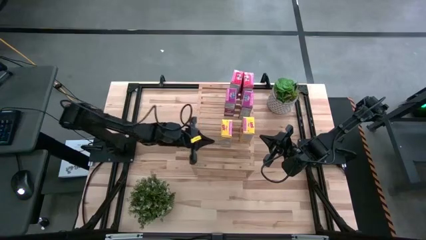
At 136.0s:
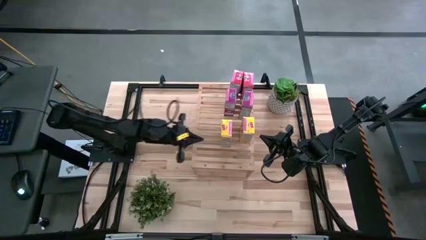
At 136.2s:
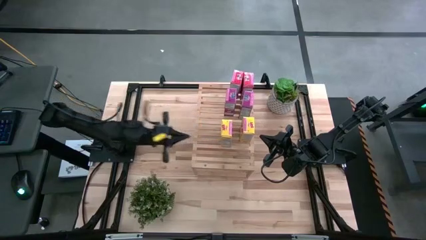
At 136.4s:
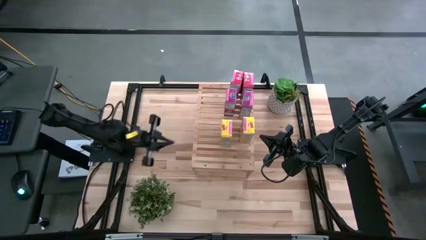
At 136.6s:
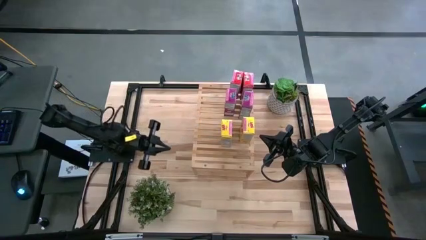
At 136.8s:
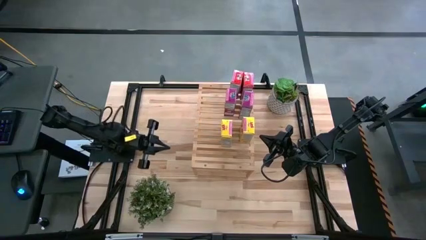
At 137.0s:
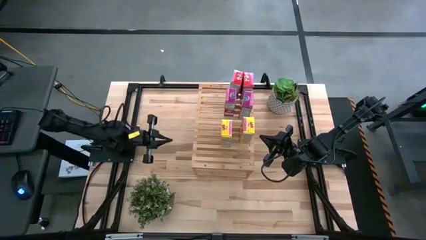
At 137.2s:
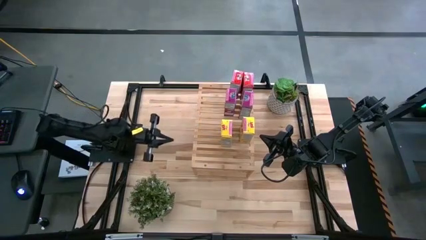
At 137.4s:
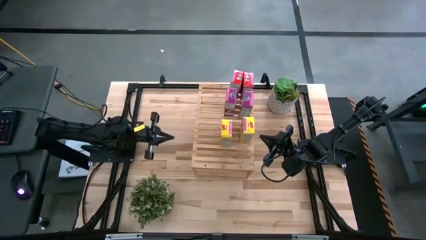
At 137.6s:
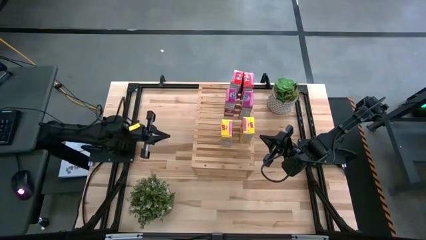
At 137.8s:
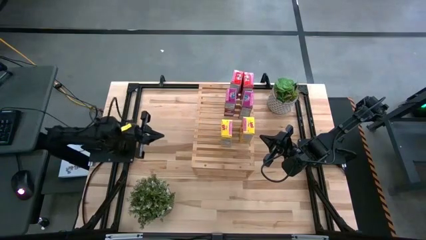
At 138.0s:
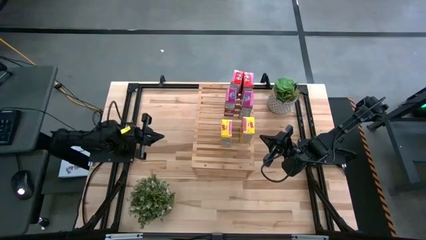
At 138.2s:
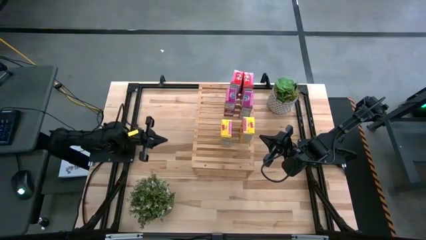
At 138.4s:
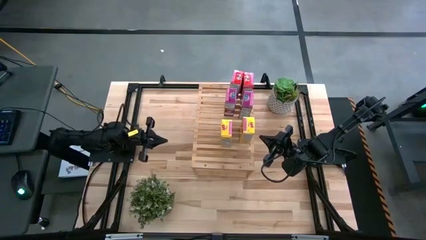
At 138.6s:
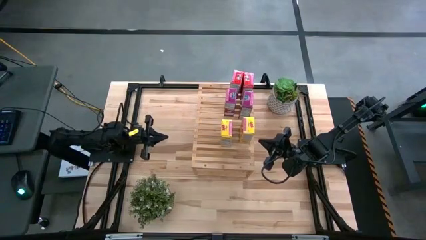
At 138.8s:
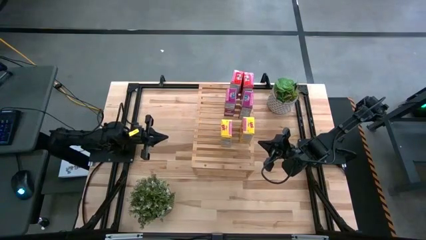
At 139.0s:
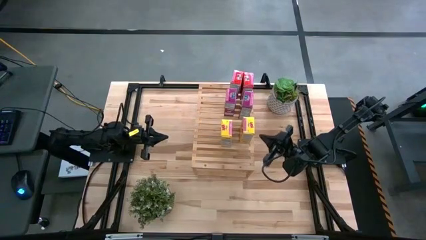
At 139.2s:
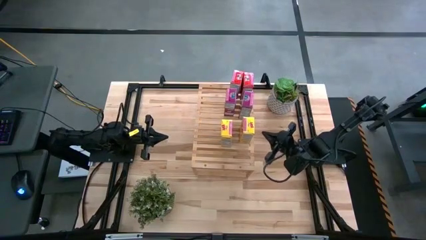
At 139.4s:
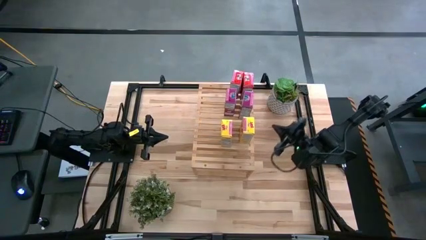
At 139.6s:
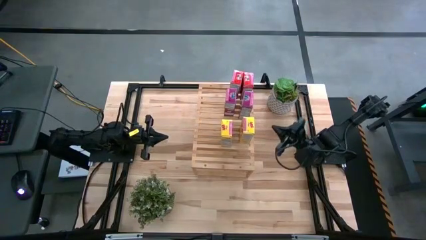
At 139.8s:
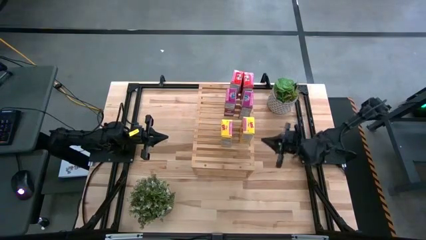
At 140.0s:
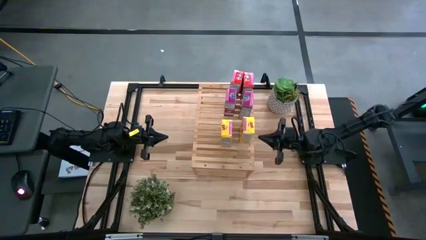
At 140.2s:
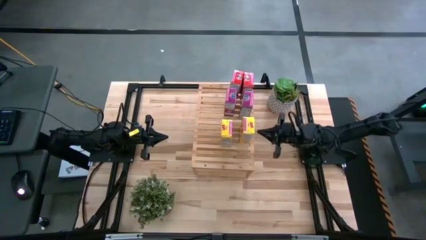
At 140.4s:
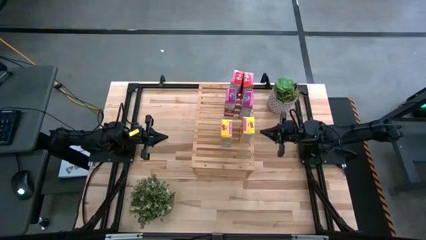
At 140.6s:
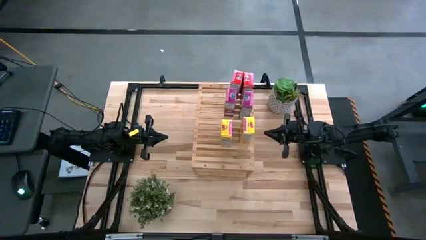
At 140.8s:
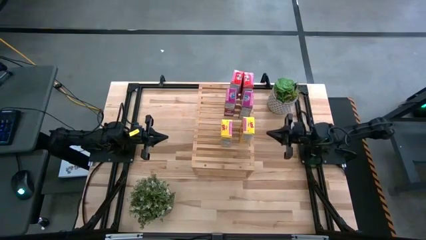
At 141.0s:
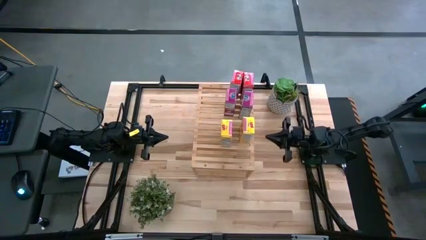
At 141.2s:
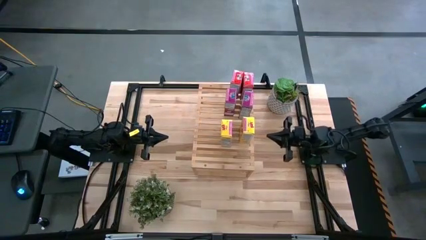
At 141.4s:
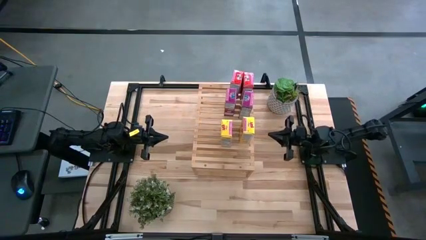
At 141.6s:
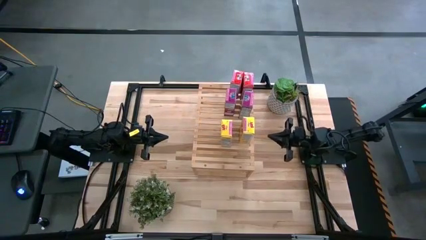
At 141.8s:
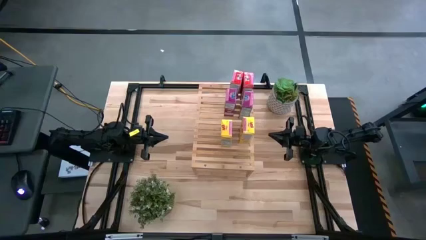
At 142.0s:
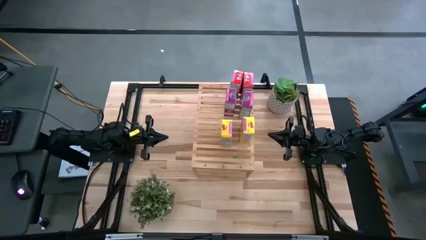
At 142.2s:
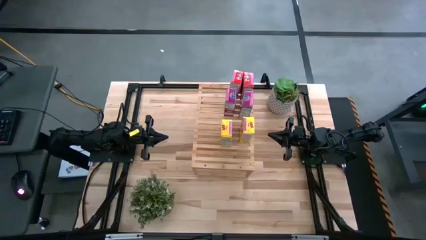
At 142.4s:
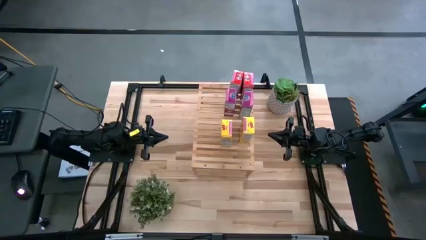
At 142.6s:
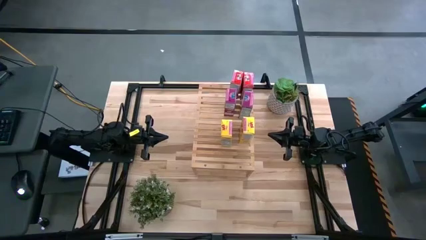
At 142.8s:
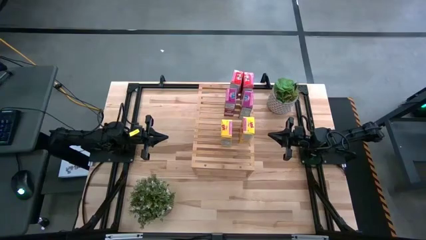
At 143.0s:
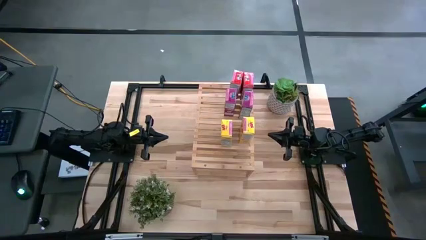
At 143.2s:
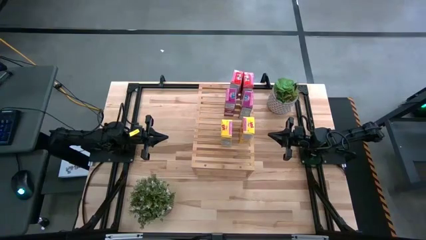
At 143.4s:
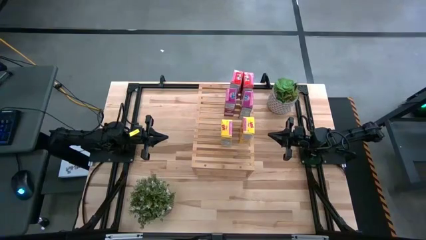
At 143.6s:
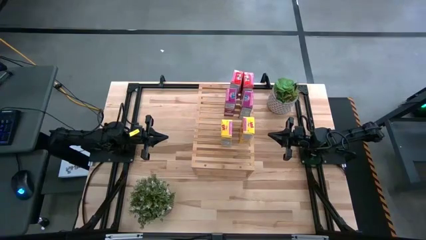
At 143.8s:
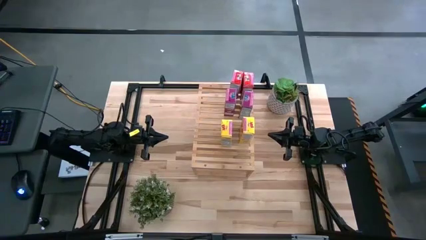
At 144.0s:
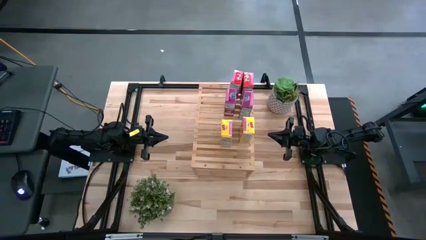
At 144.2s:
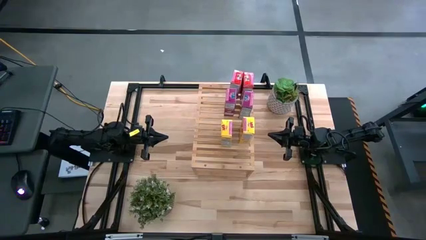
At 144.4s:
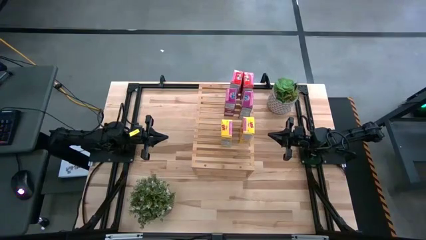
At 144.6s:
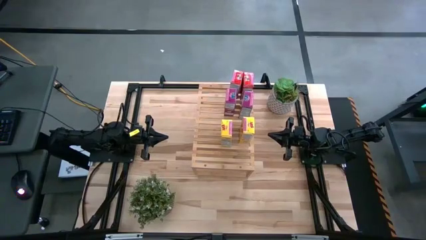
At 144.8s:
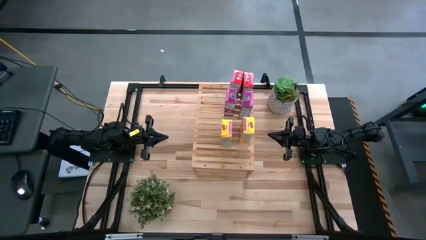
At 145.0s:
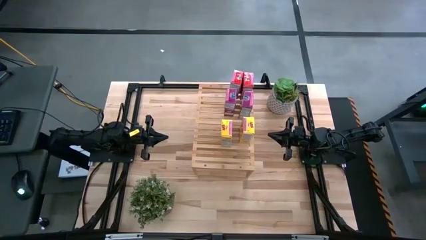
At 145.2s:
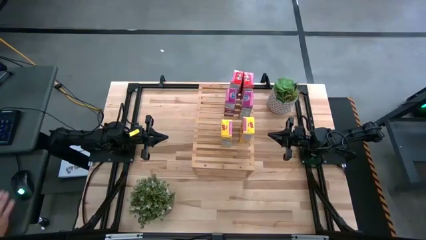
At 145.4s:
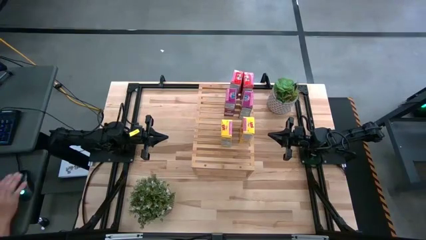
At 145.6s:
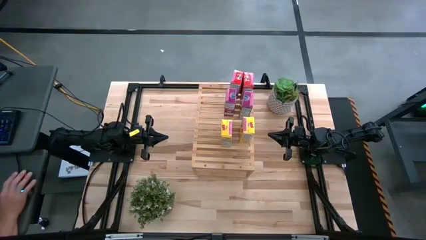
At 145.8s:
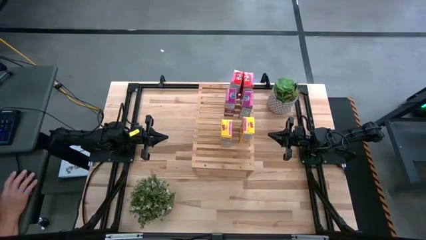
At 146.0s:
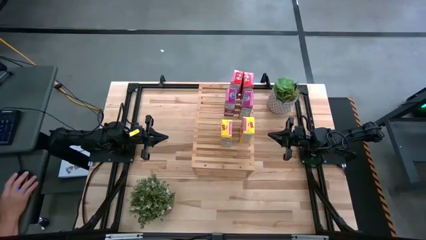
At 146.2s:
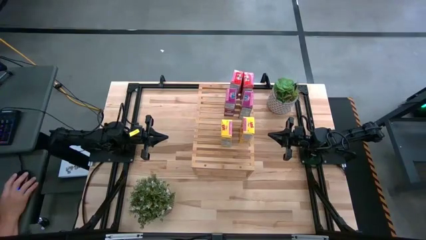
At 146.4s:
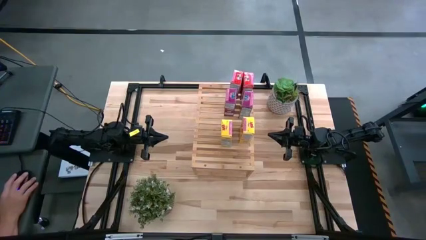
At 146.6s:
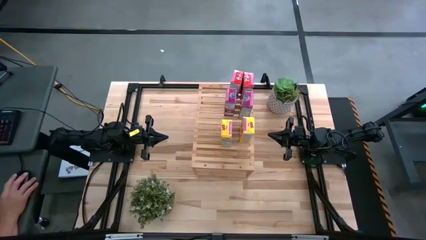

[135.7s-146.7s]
Task: Stack cereal on shelf
Return to Home Position

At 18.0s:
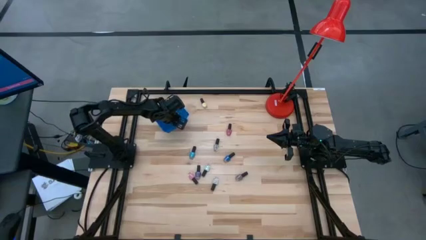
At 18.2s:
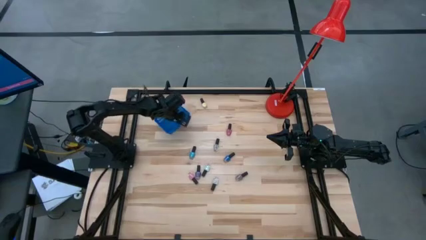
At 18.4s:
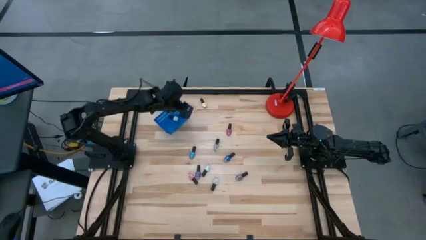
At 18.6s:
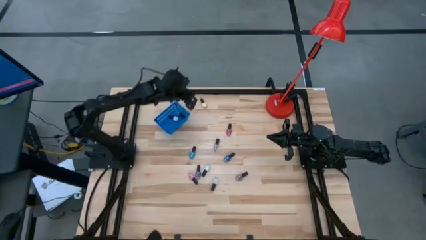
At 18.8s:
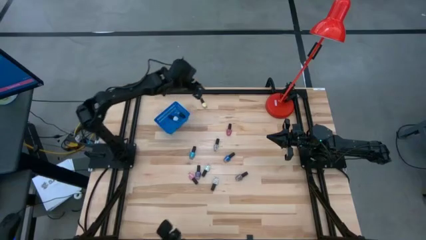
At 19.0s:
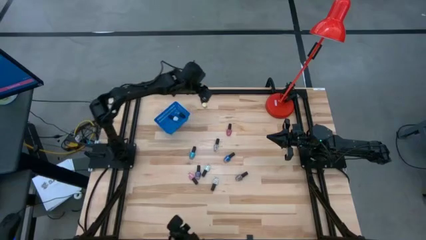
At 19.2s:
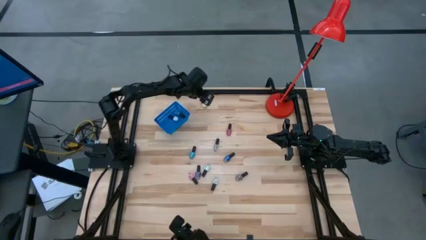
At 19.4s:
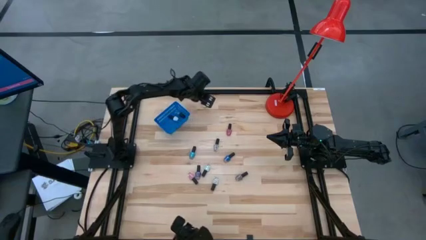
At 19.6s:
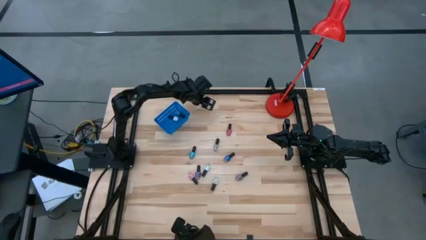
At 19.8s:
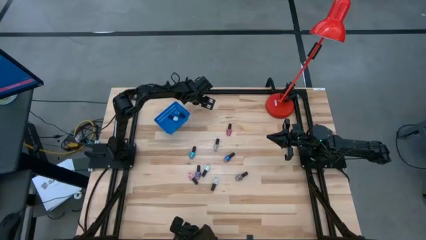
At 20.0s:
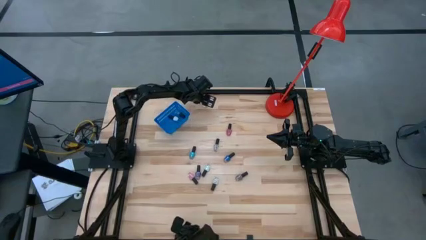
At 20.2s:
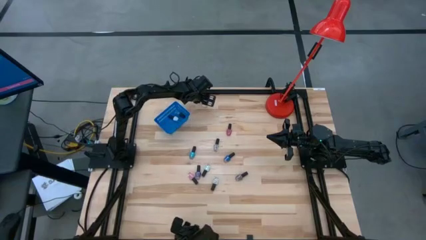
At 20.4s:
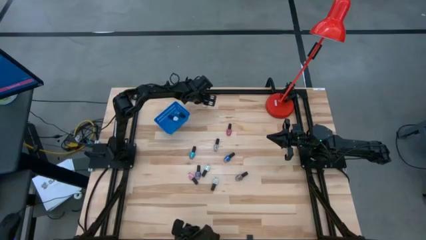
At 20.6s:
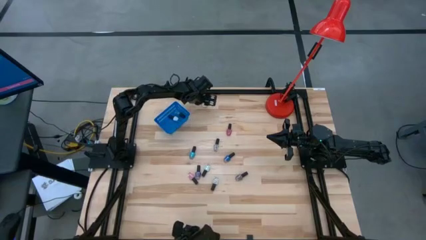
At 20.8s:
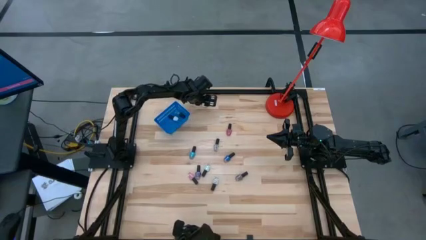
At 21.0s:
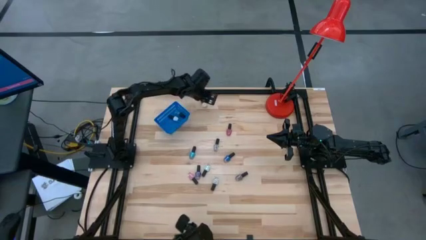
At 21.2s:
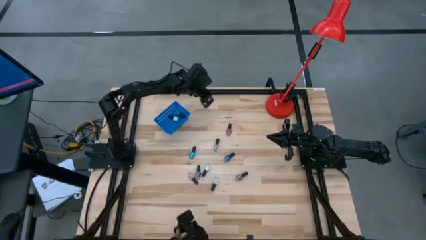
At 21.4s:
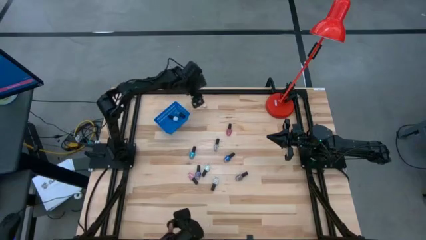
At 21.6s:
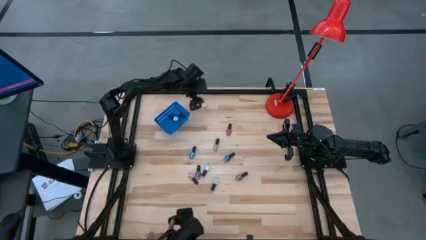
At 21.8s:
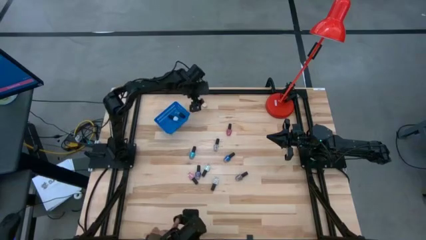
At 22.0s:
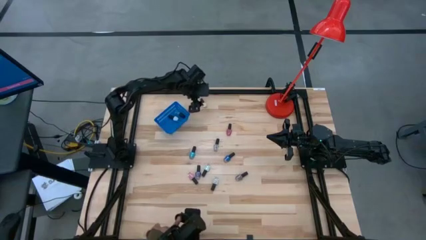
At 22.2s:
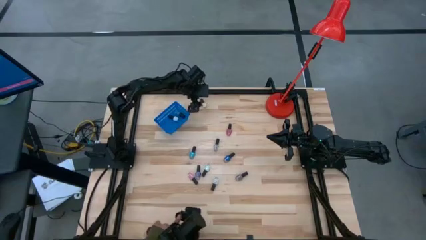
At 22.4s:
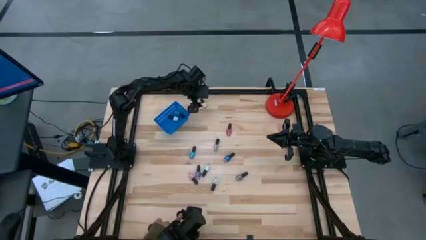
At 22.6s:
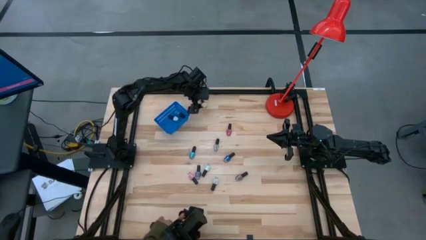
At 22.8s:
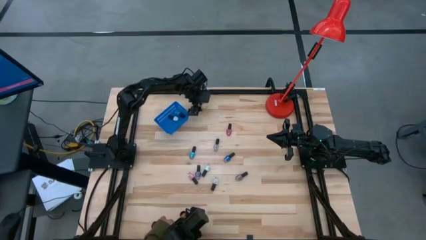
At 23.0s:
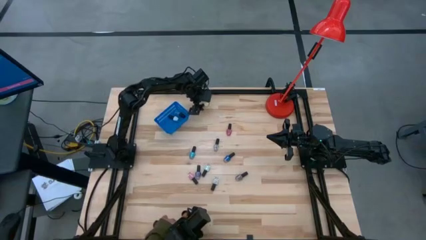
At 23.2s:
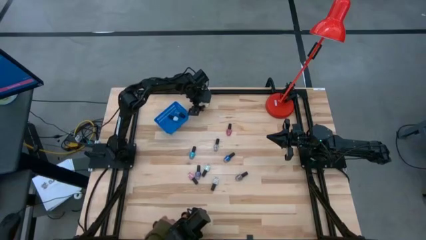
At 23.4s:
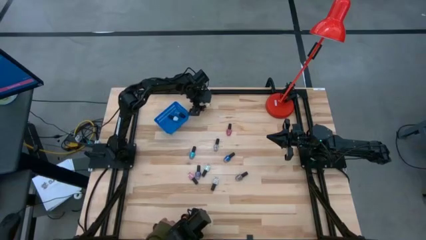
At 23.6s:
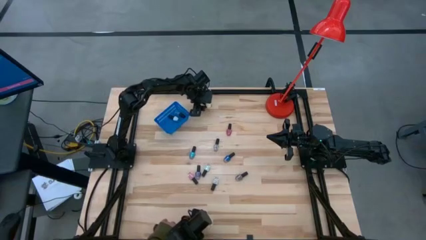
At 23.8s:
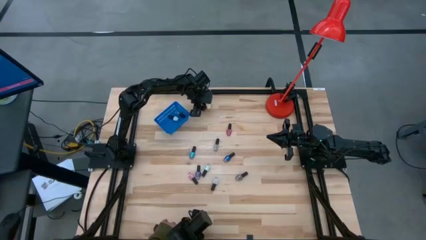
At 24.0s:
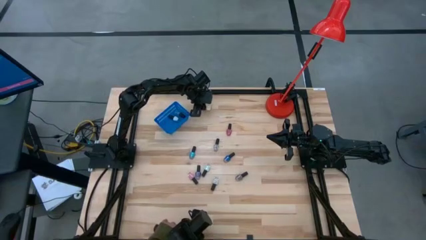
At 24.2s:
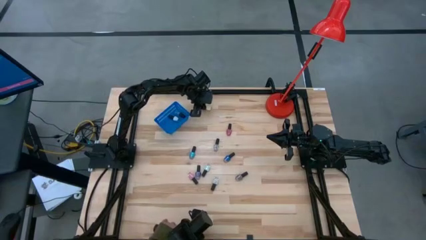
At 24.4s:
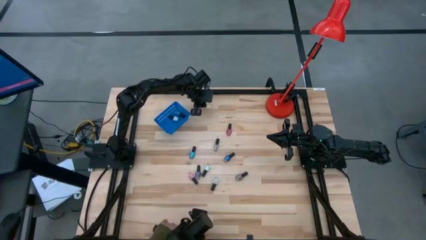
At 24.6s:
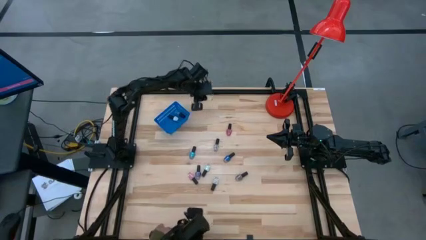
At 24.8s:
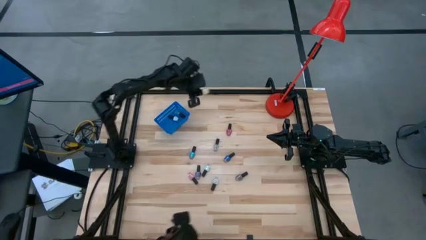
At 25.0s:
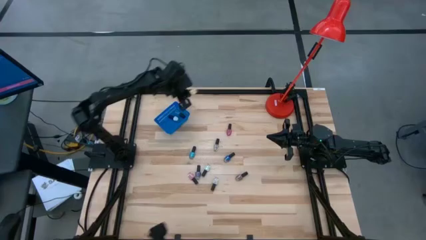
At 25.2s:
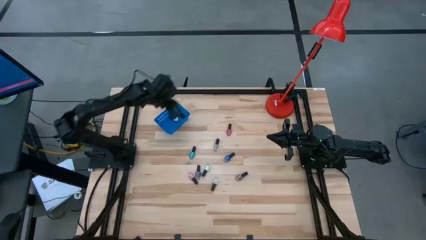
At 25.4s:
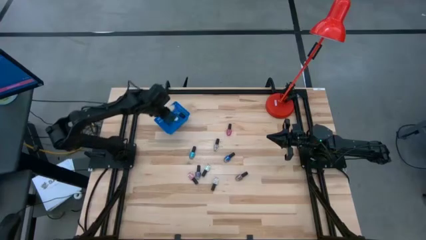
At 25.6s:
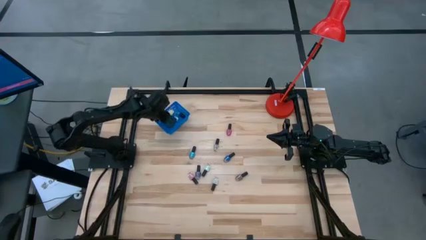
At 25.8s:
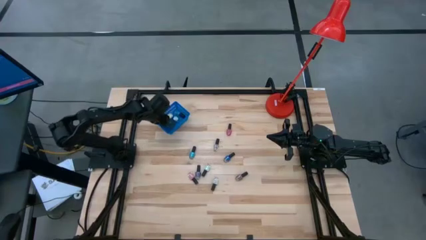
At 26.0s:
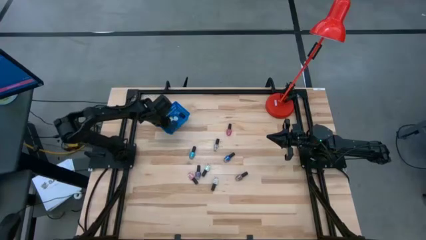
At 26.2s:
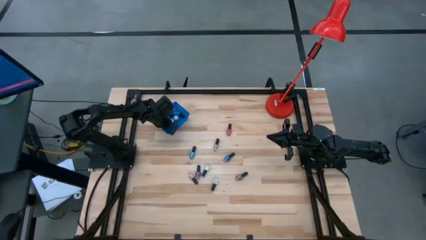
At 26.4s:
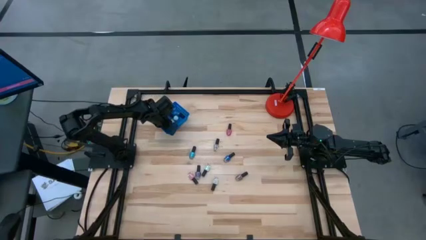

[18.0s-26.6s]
Task: Pick & Place Nail Polish
Put the yellow nail polish bottle into the blue bin
